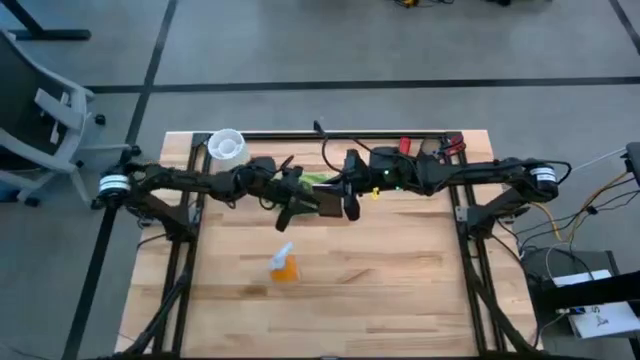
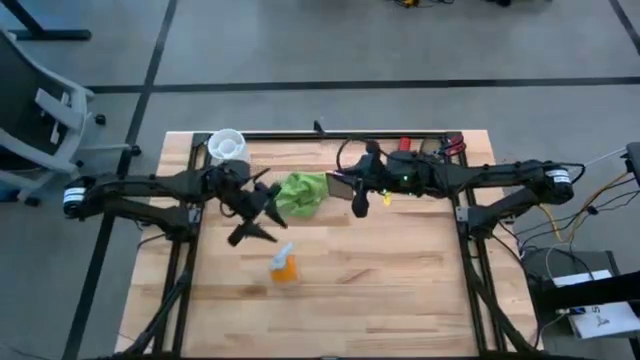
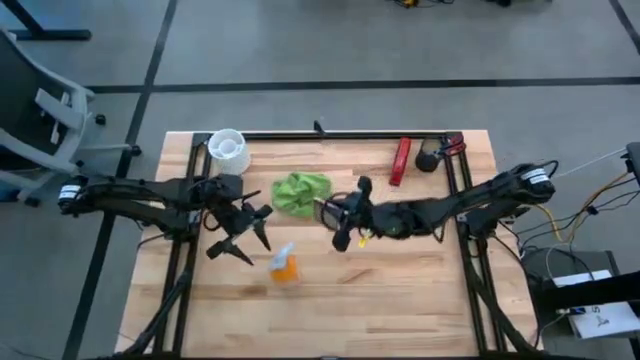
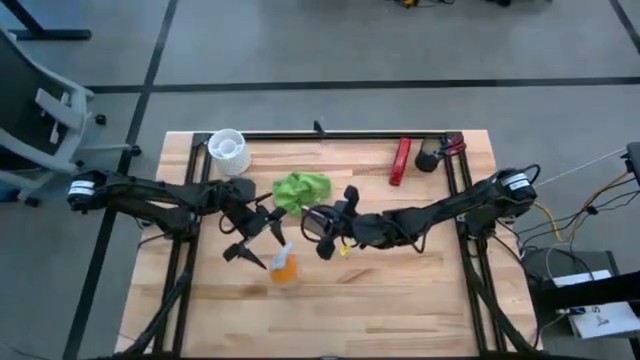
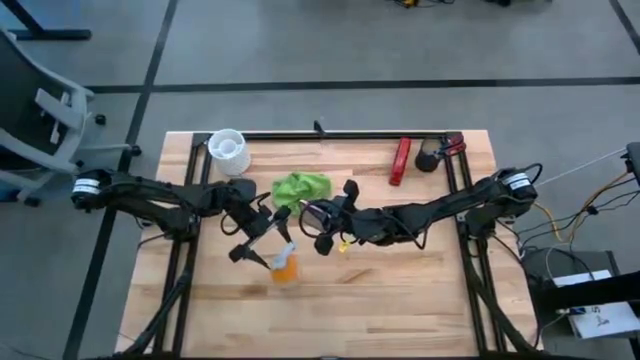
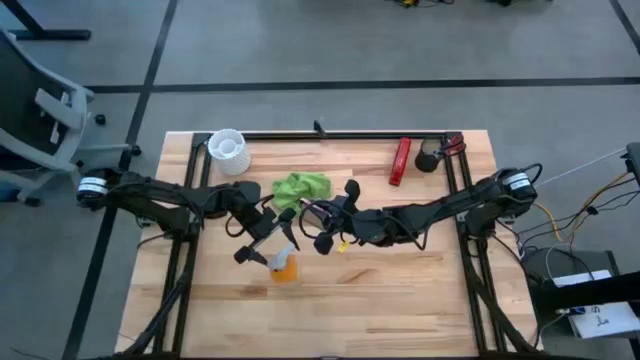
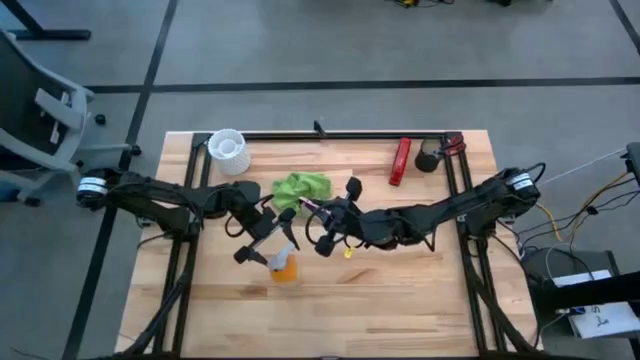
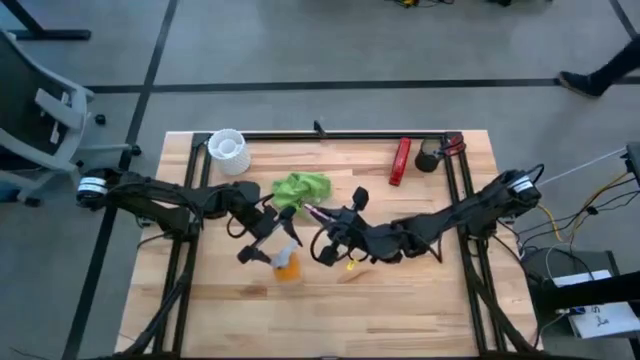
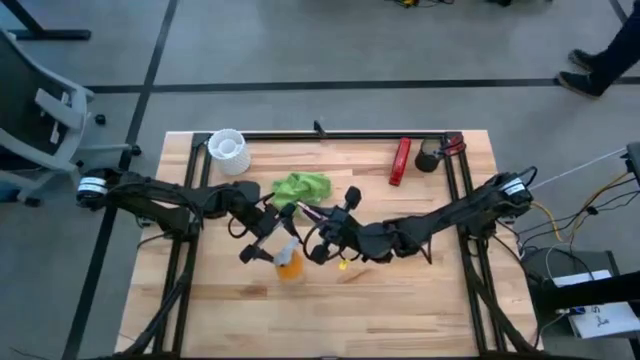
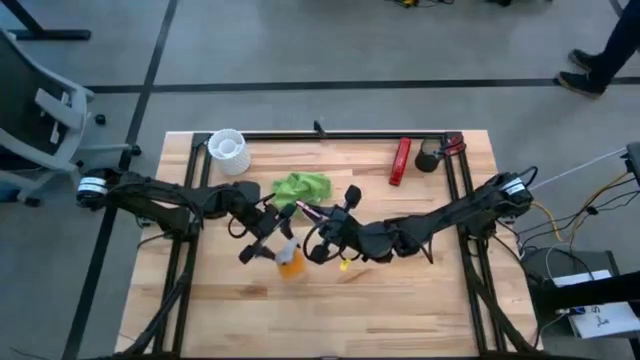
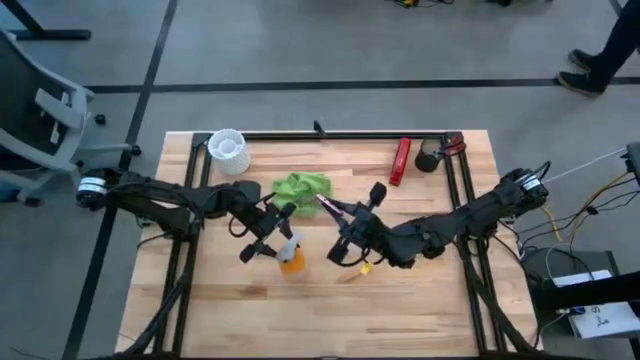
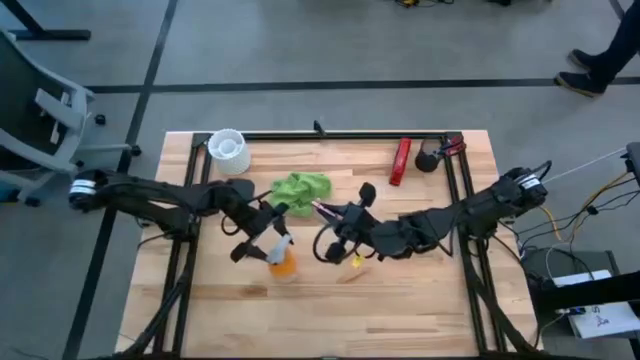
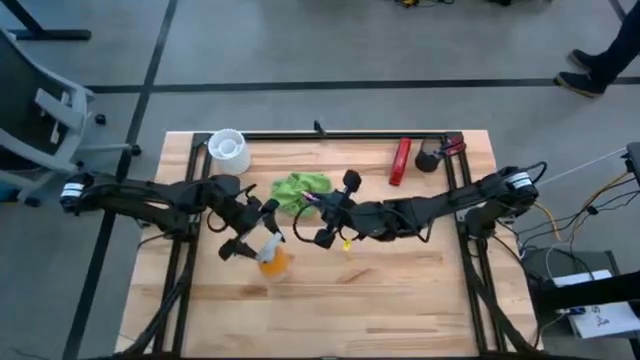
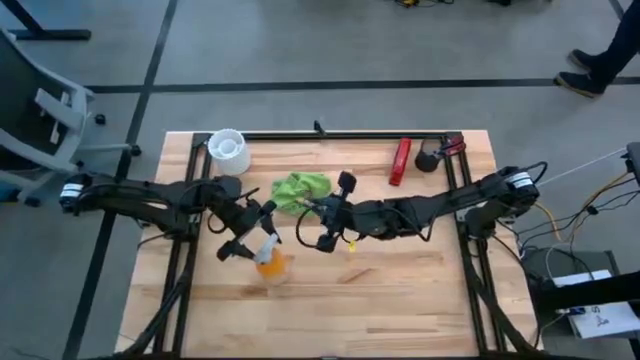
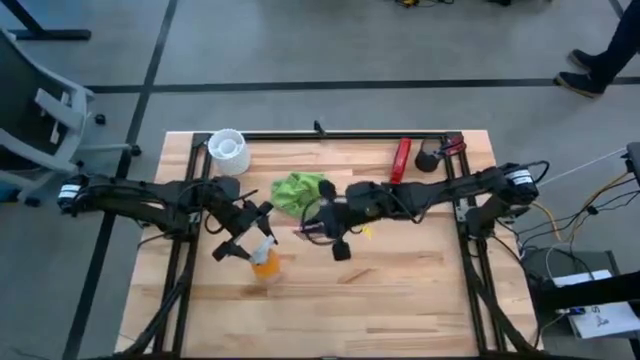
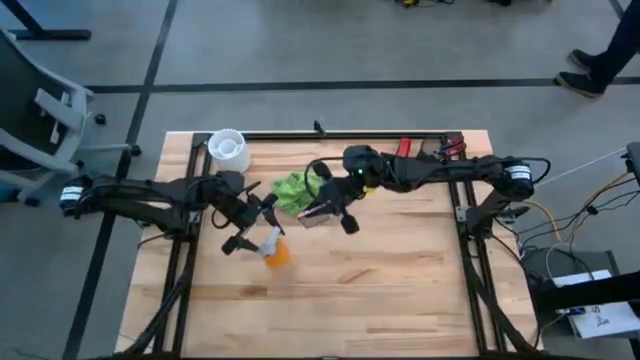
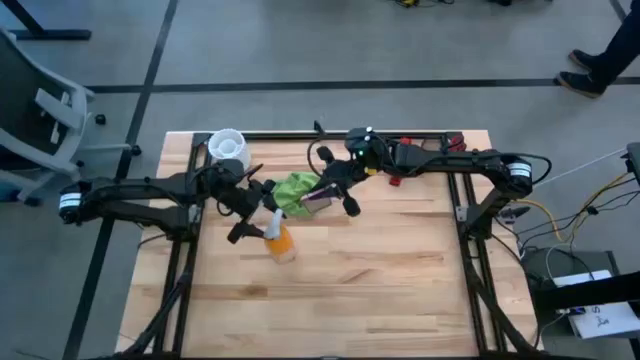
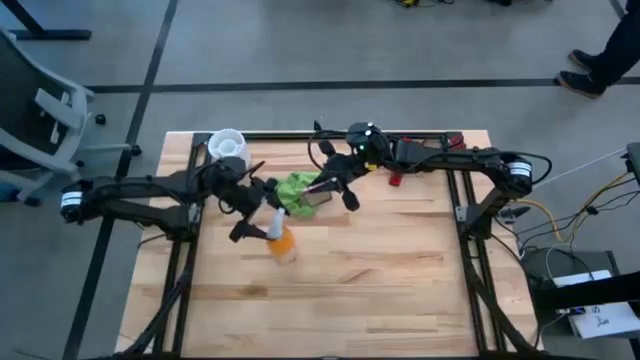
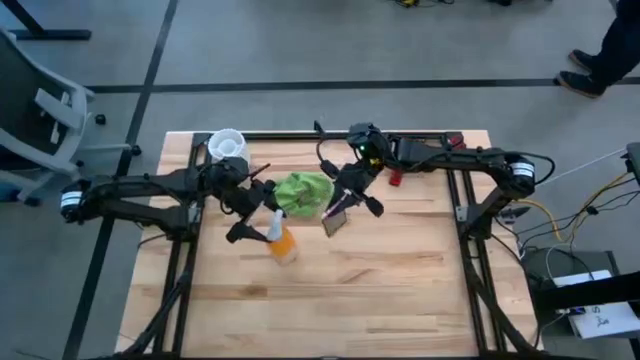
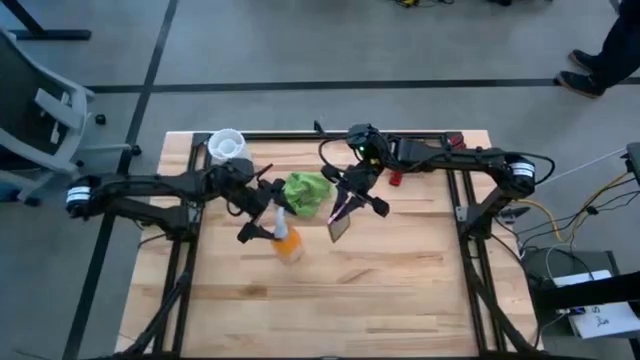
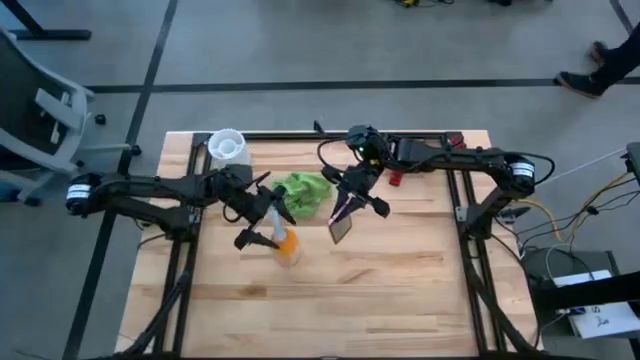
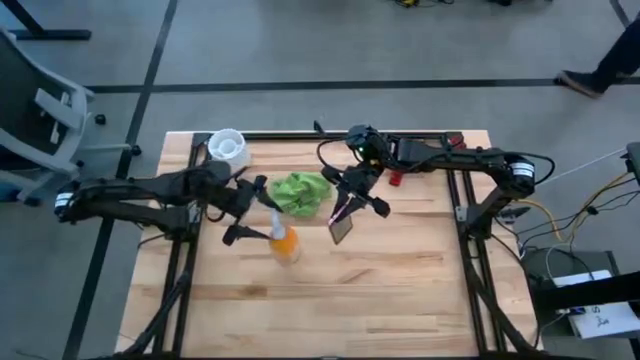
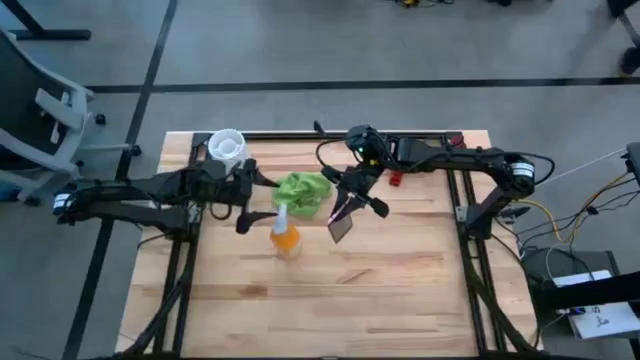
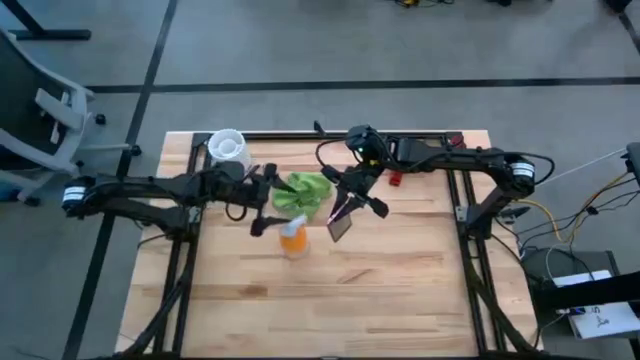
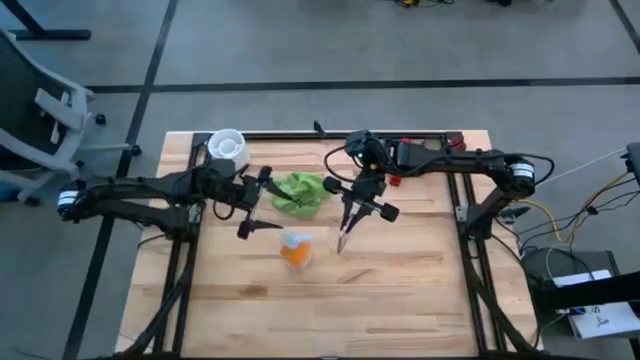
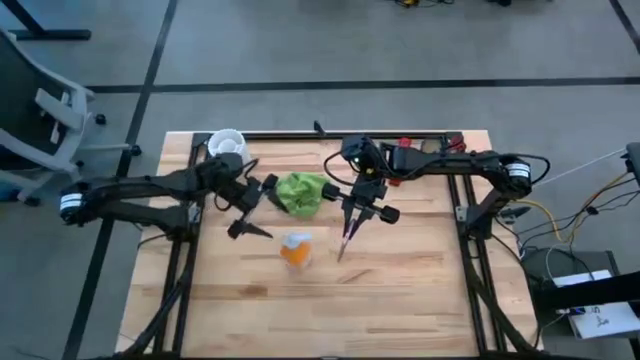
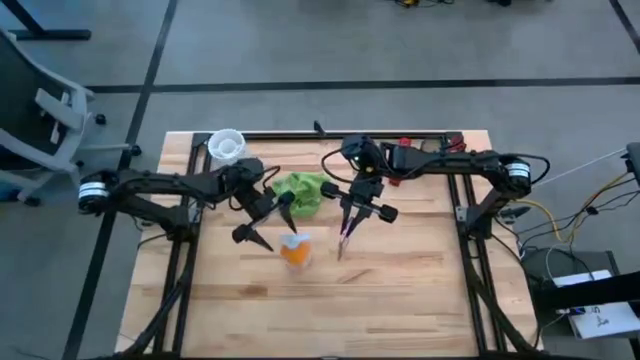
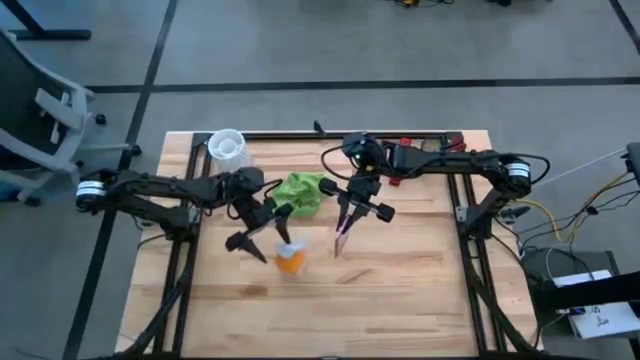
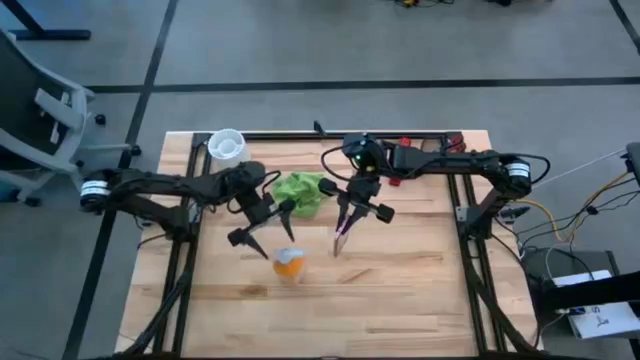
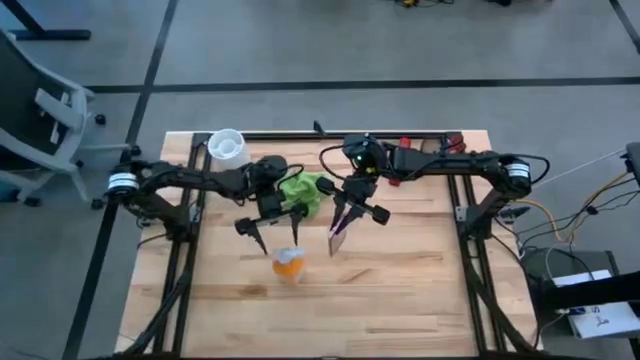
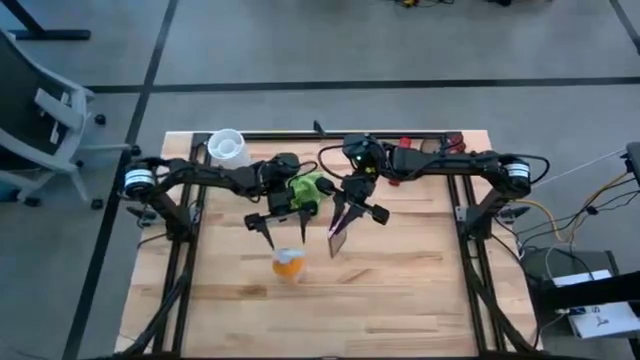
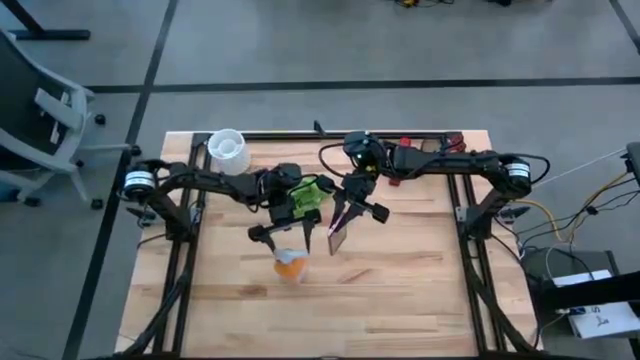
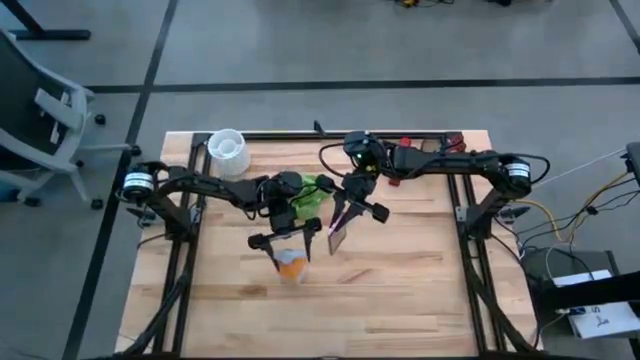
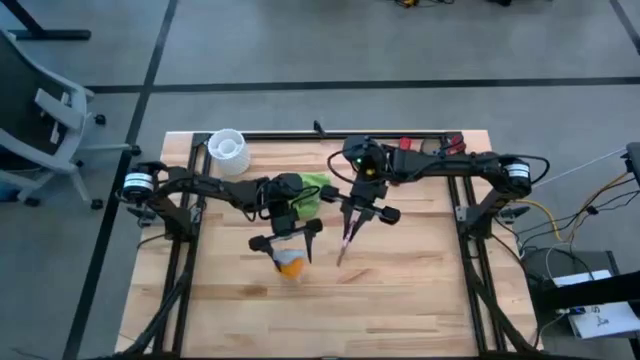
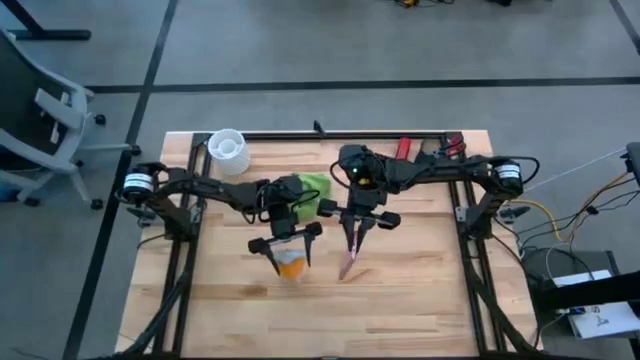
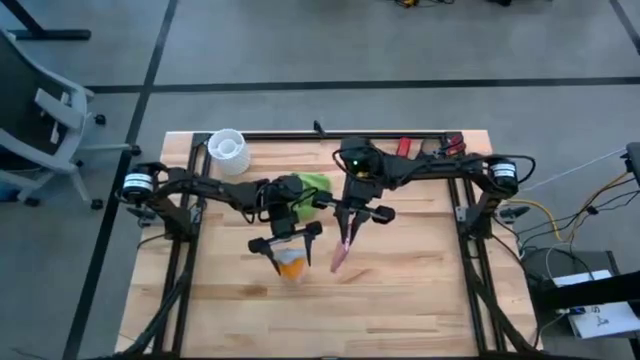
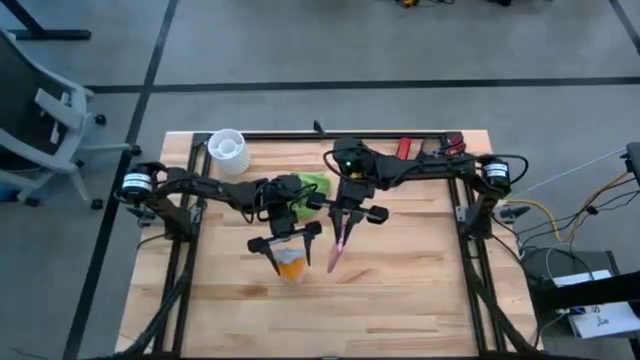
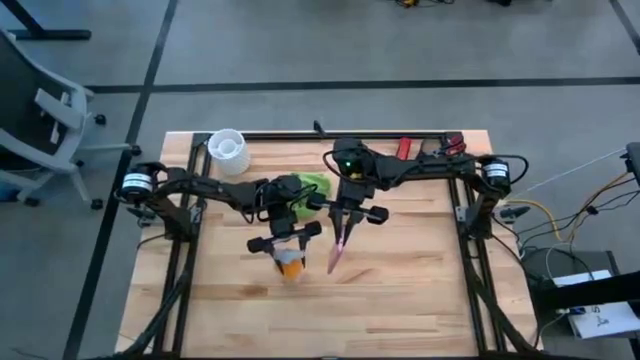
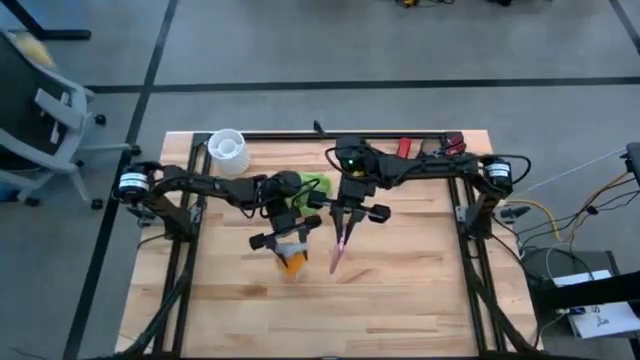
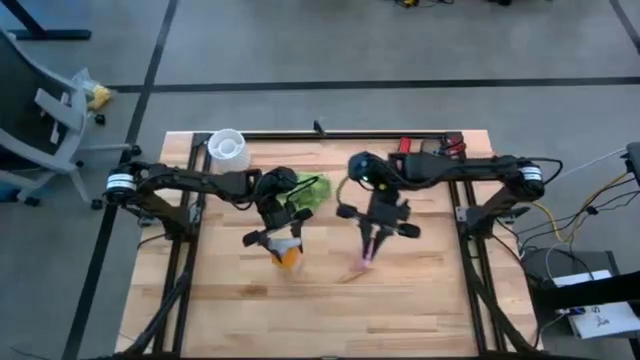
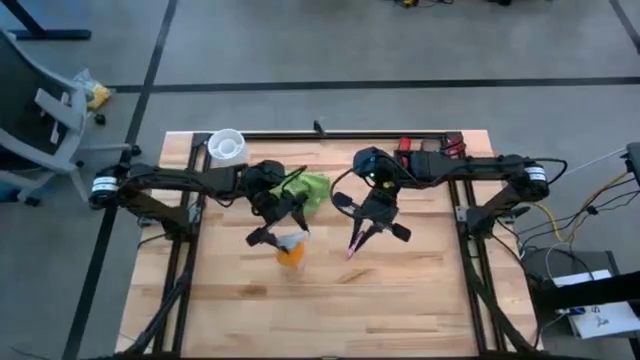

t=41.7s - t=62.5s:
Task: Apply microfiber cloth
Spray the front and back of the cellphone using the cleaning bottle

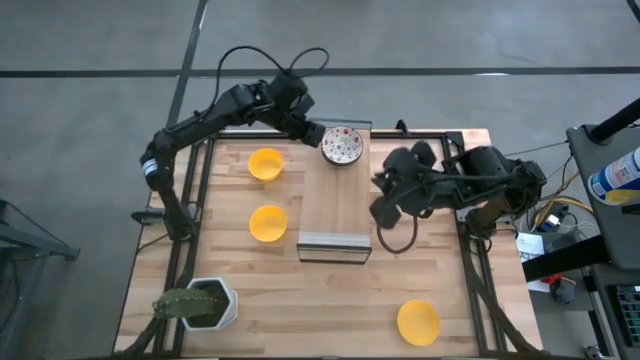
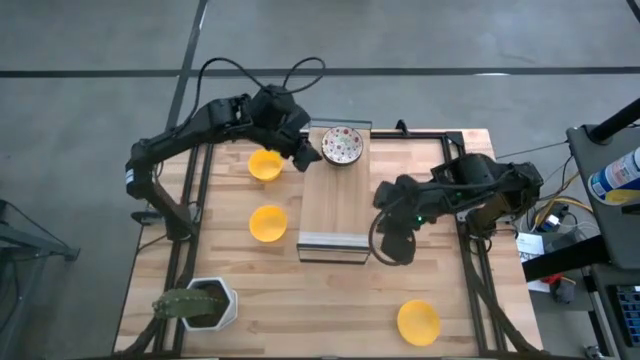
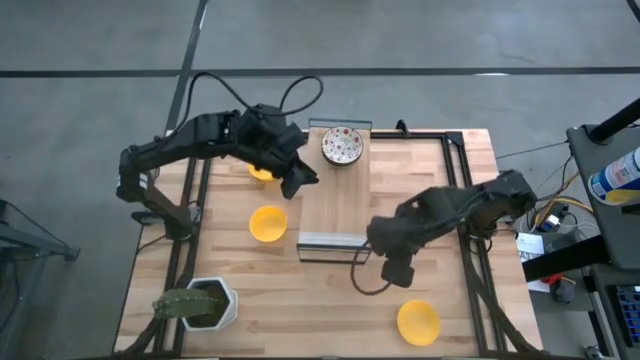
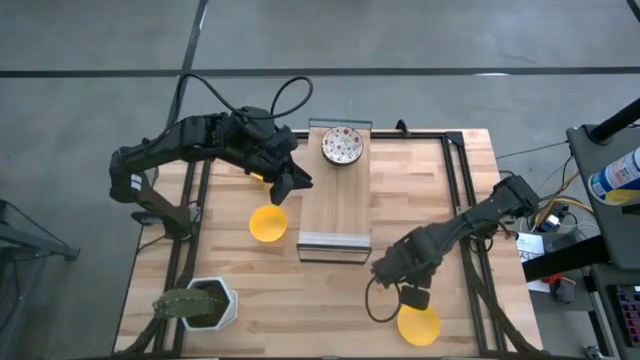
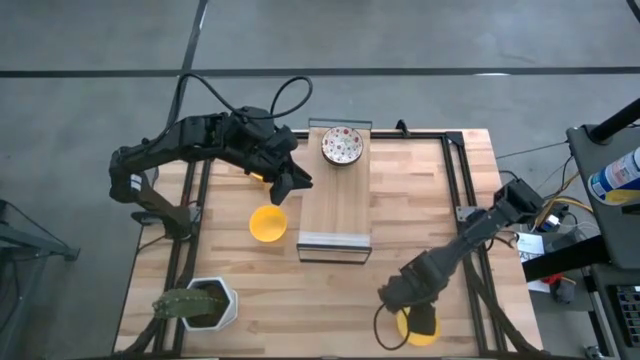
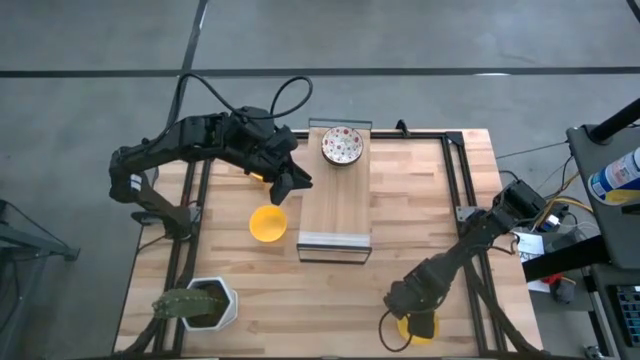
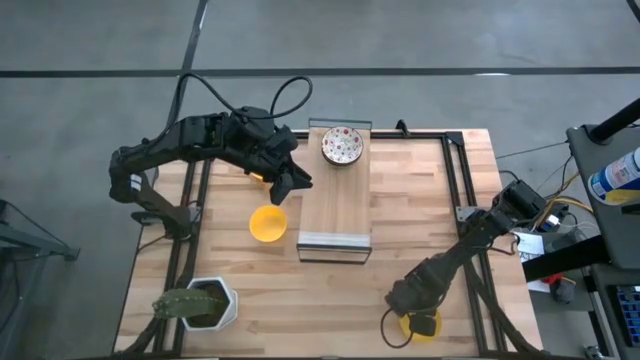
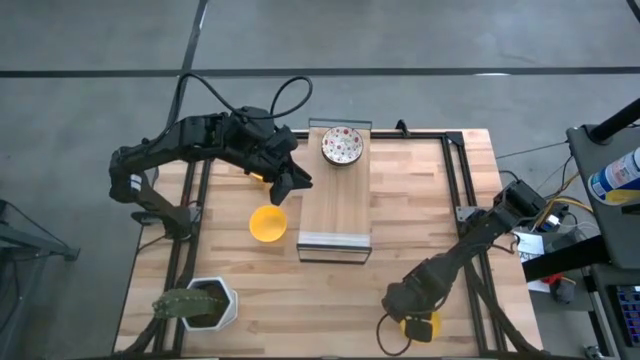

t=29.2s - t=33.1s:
Task: Pick & Place Mini bowls
Put the bottom yellow bowl on the shelf
